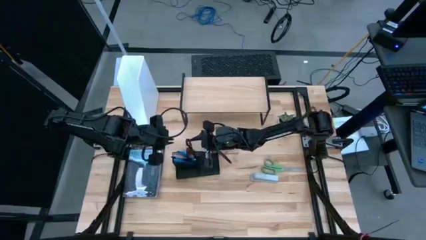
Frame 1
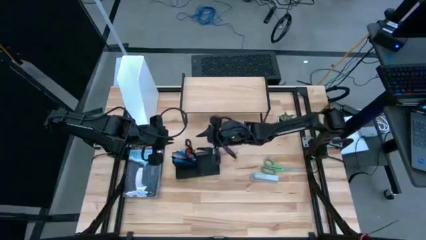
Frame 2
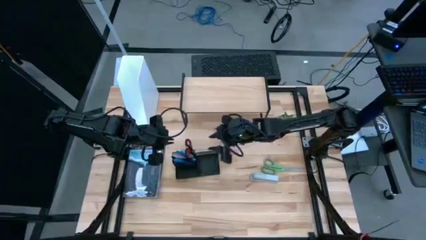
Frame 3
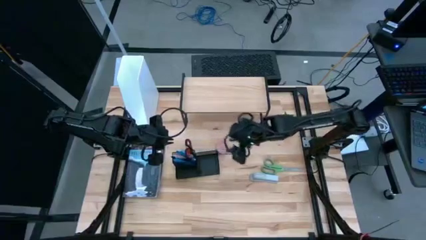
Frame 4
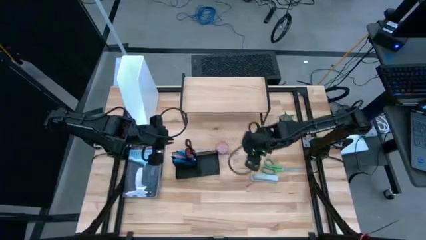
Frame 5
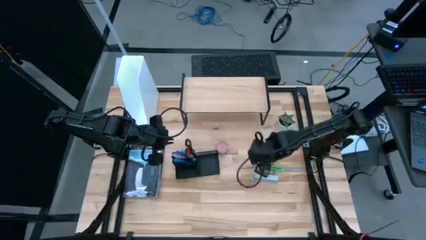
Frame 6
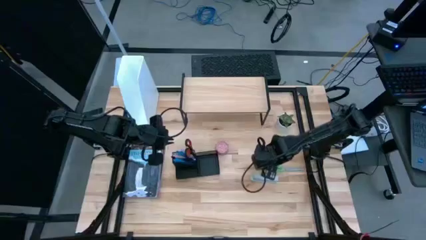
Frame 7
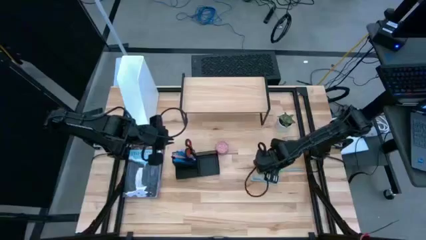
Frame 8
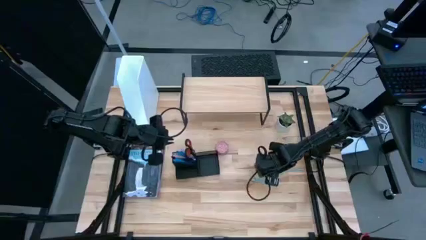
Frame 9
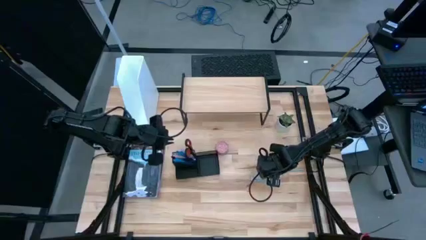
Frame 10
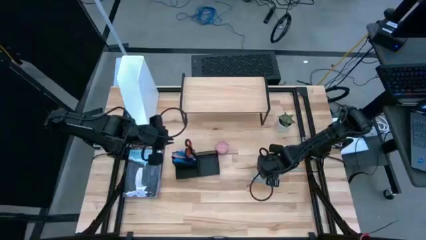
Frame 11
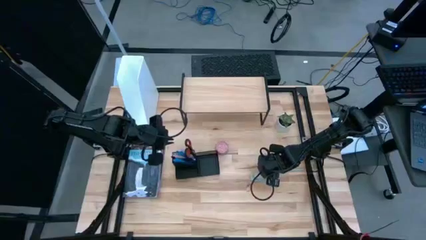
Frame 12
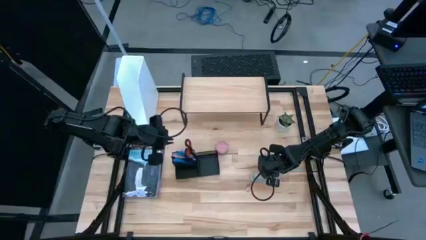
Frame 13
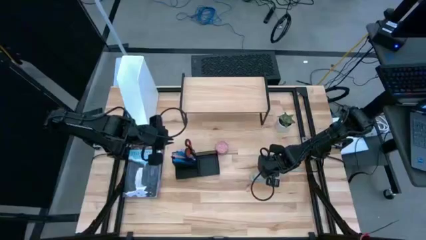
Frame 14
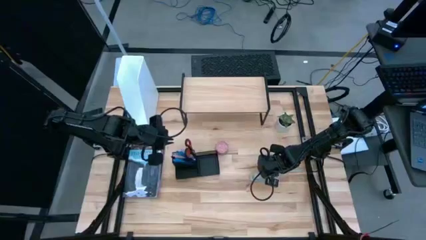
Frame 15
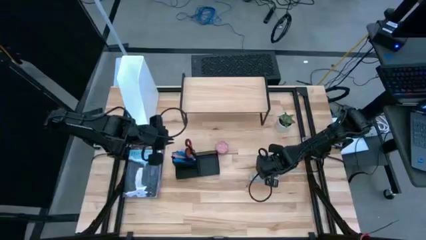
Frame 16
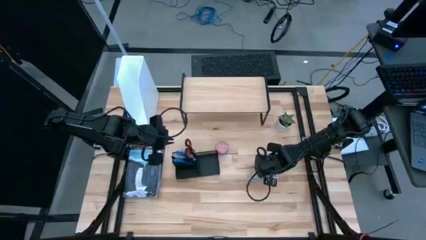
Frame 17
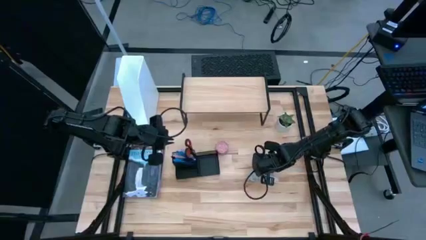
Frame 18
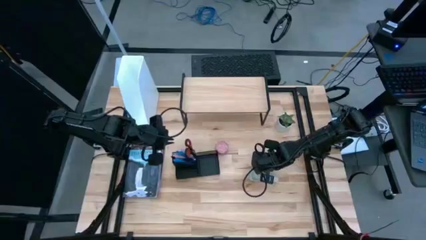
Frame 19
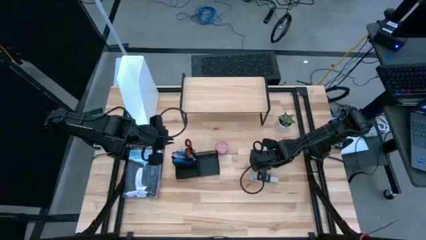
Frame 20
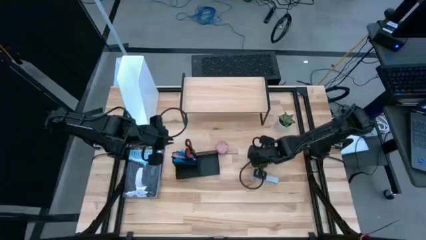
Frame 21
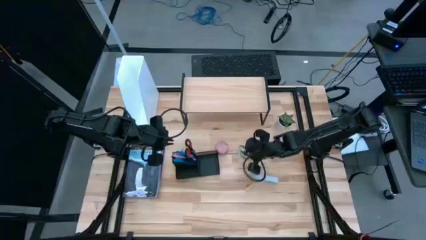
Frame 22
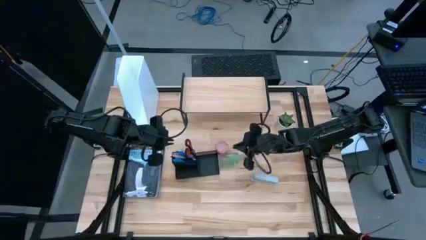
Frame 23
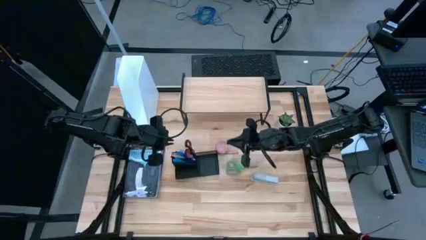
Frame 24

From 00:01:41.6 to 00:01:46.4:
Task: Stock shelves
Put the green scissors into the desk organizer

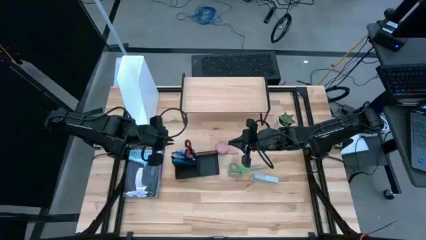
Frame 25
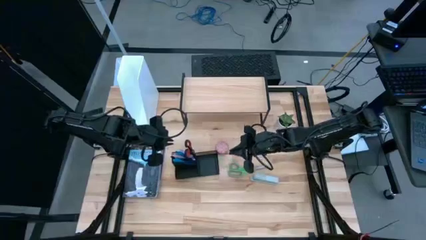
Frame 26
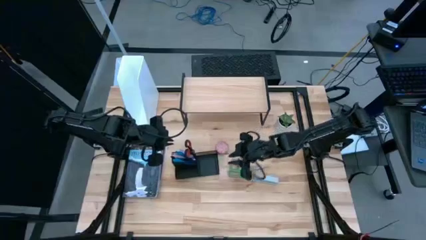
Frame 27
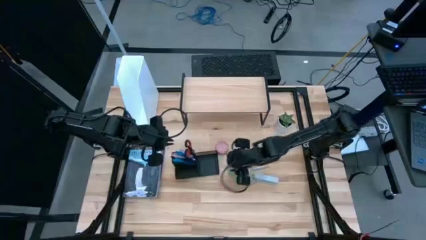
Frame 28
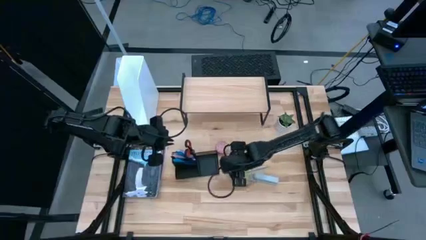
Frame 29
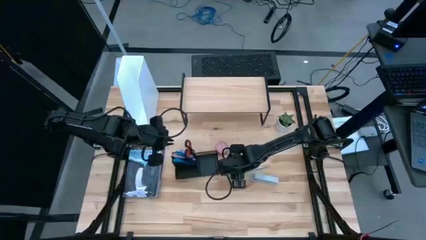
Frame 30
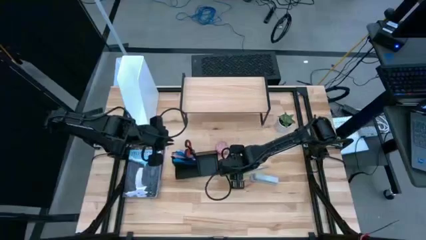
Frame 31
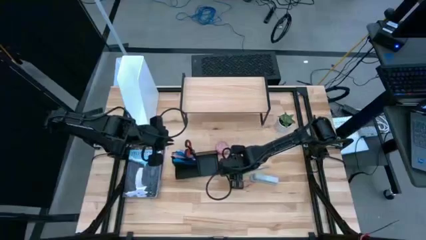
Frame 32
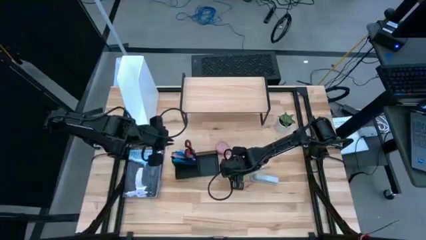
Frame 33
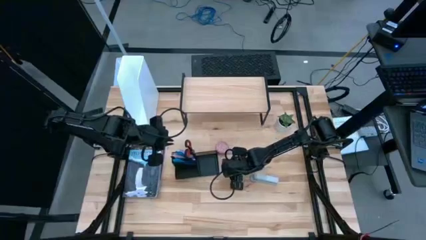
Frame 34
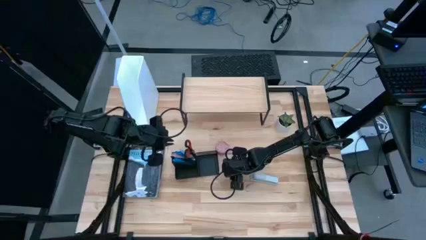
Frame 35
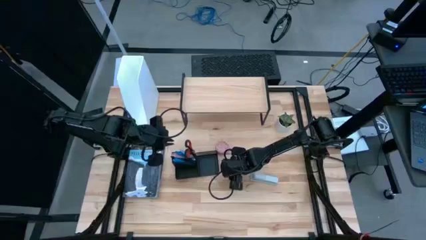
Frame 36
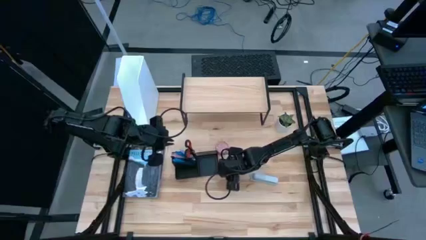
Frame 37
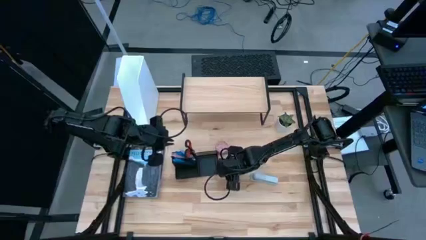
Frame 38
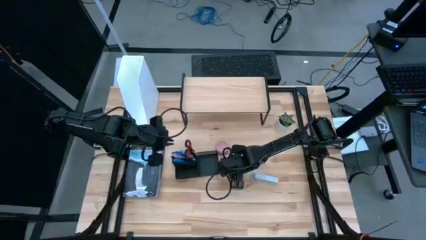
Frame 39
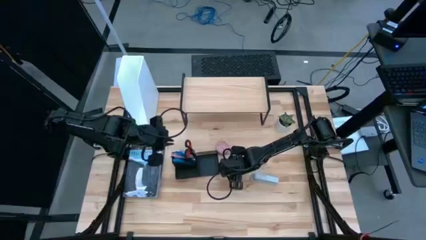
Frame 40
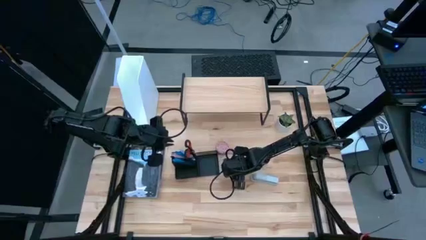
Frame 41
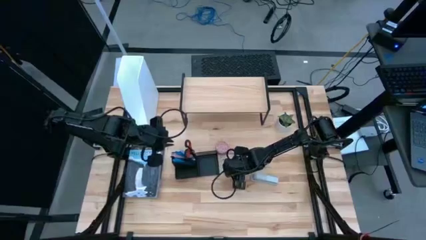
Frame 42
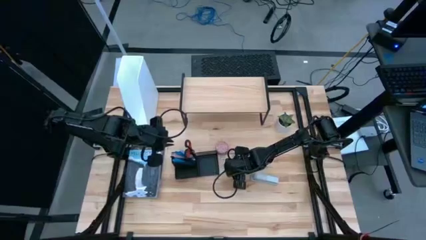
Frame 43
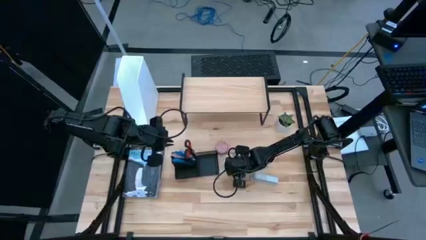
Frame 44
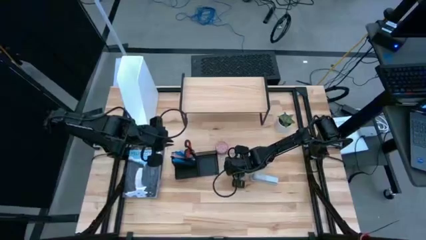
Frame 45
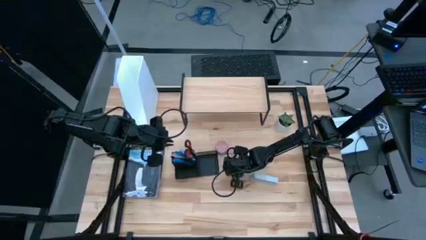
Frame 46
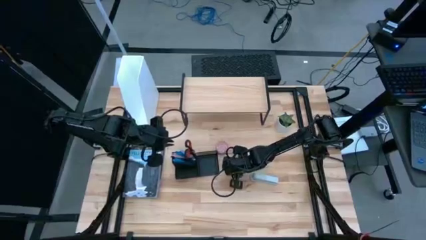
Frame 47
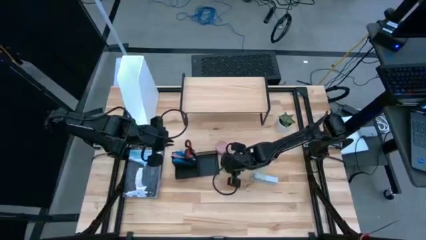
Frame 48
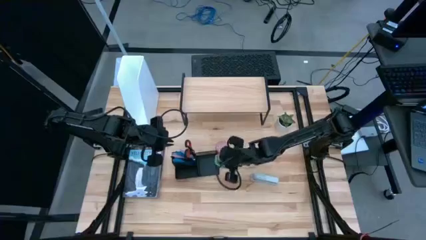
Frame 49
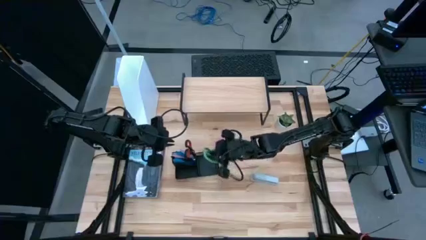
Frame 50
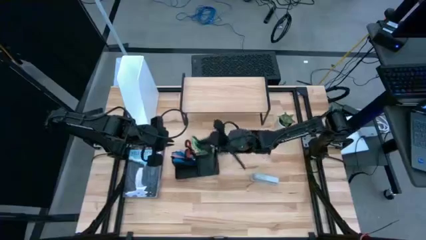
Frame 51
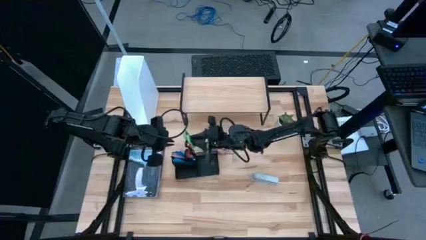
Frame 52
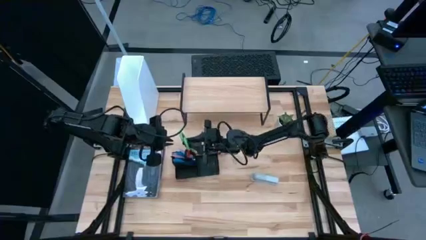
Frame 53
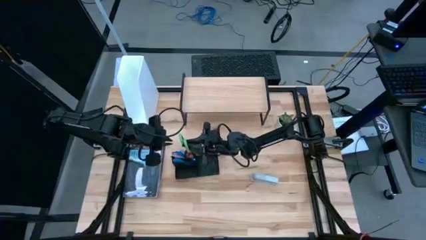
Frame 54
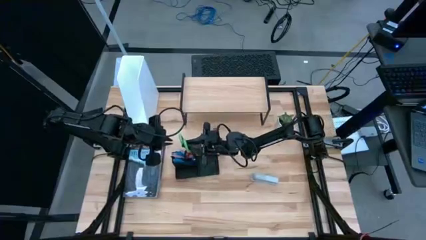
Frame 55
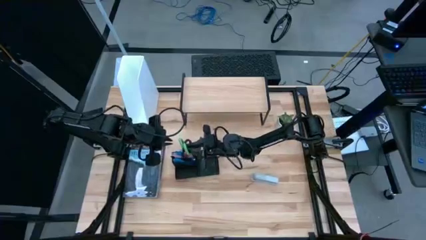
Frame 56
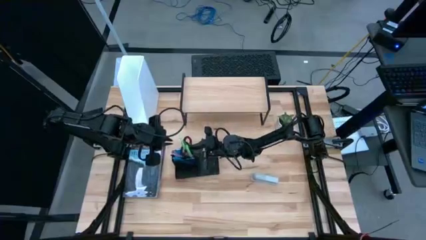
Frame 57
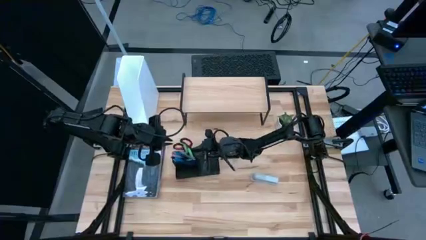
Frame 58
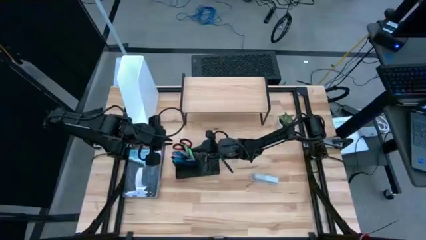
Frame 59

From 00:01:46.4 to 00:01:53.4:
Put the green scissors into the desk organizer

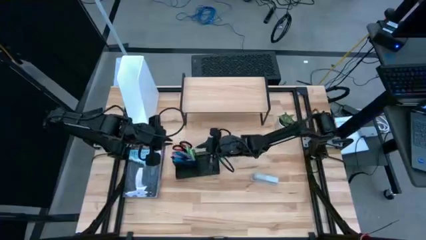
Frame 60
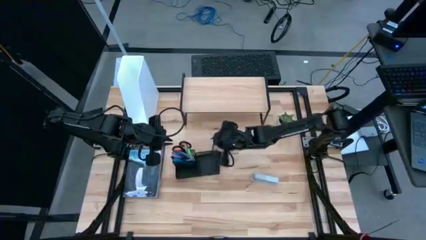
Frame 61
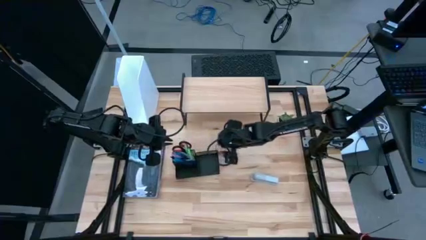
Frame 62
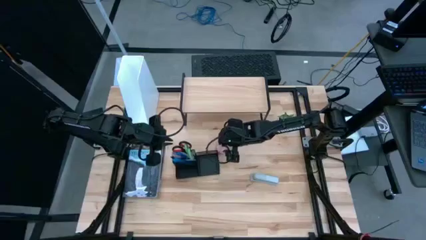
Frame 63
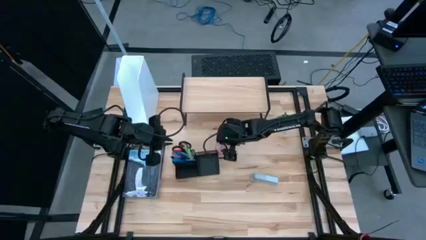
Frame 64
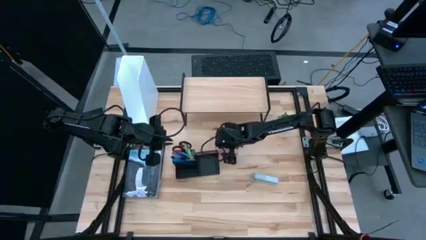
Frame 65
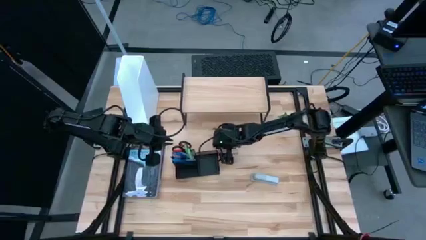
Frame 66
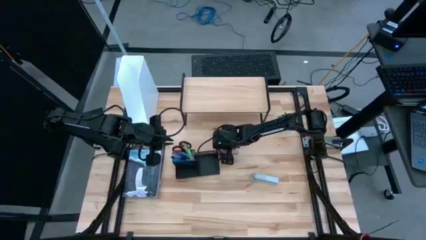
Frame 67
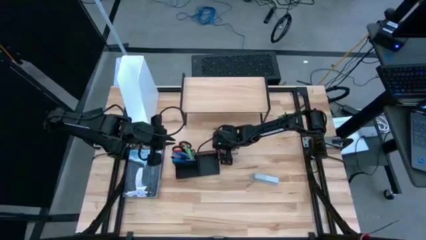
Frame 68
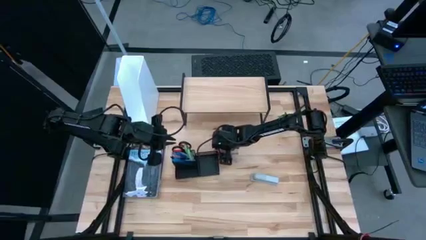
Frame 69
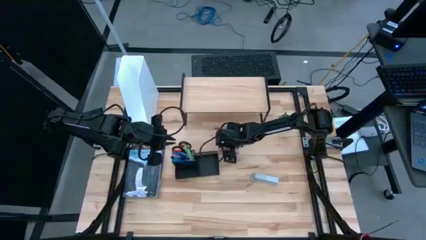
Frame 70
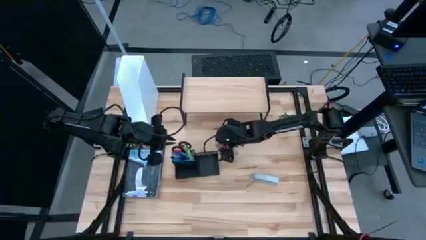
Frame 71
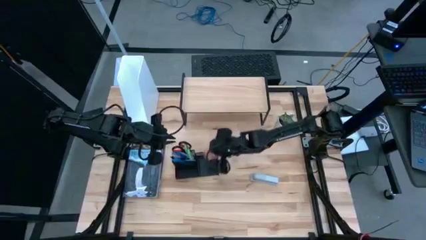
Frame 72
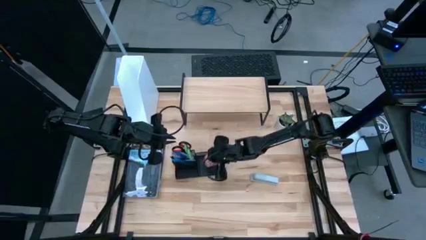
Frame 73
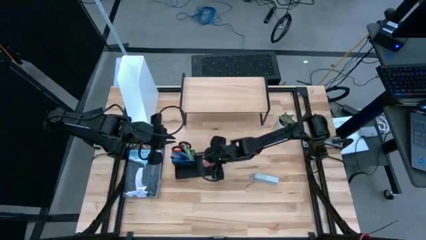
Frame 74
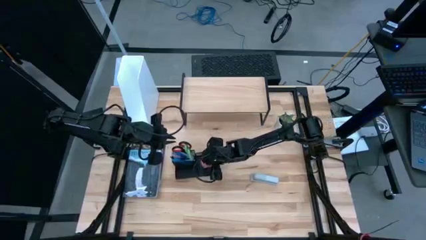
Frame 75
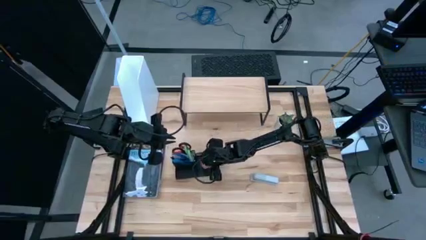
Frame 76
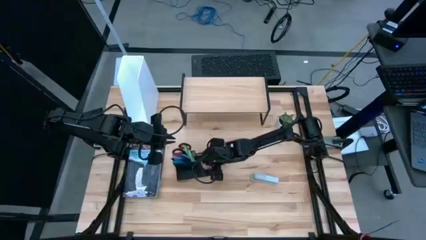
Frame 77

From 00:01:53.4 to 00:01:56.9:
Put the red scented candle into the desk organizer

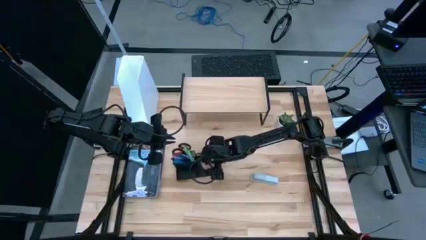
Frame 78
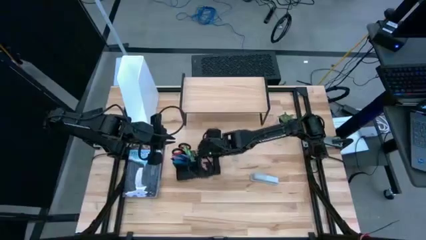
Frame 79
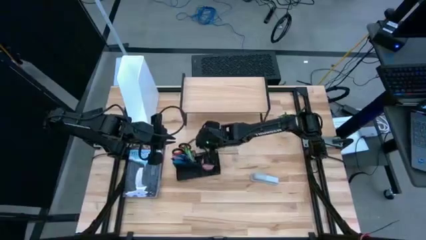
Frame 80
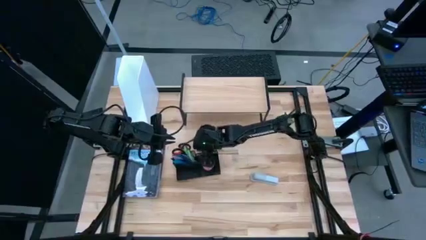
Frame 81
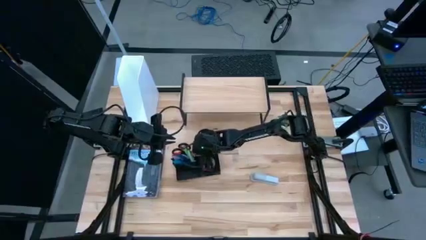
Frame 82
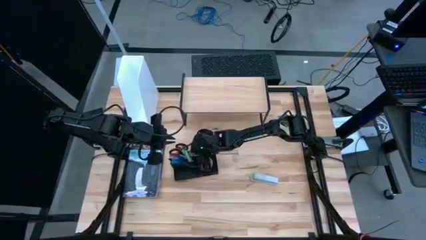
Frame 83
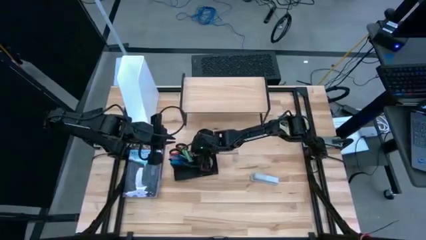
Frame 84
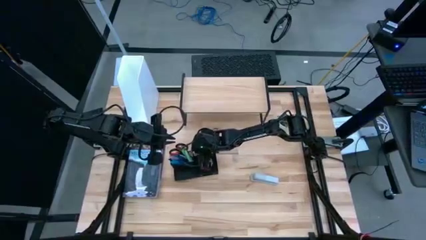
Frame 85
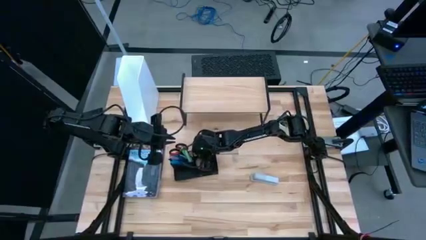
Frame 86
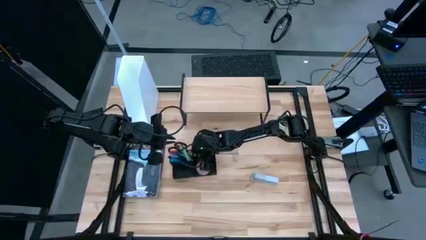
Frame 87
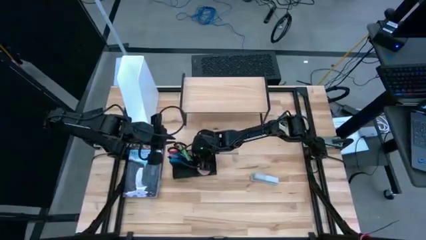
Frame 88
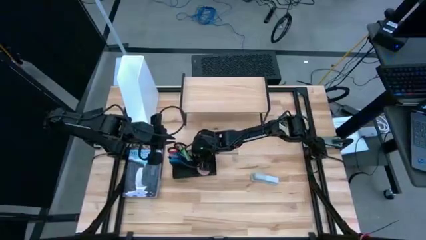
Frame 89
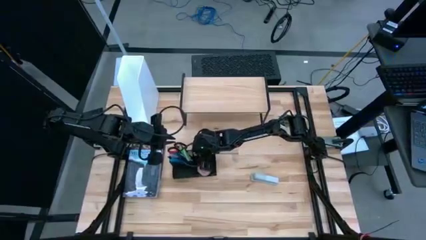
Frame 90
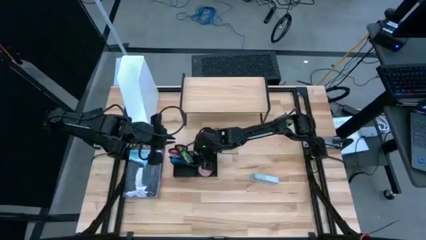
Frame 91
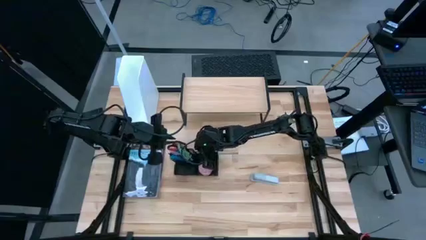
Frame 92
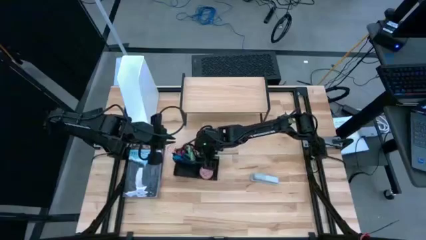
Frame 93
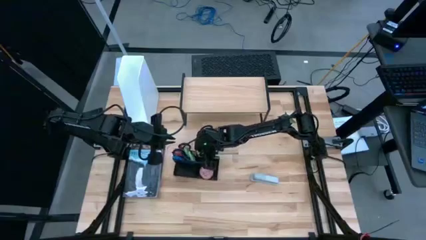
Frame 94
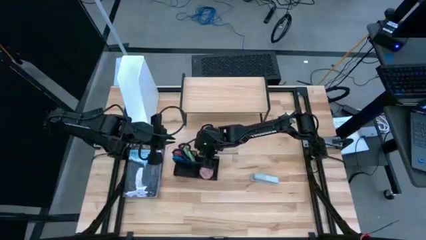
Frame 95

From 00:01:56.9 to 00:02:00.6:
Put the desk organizer on the shelf
